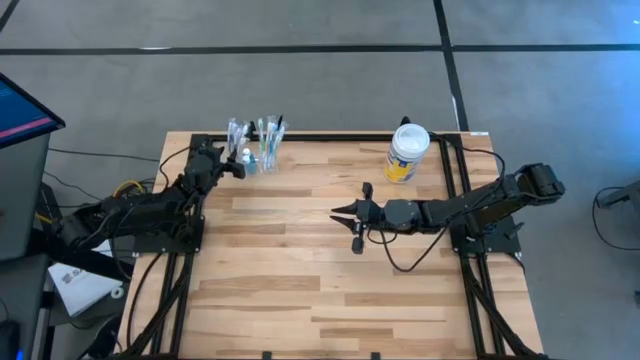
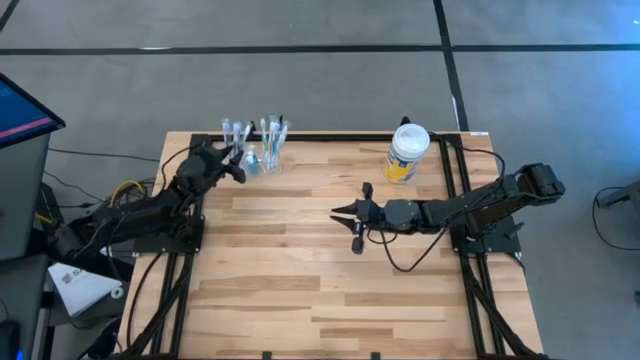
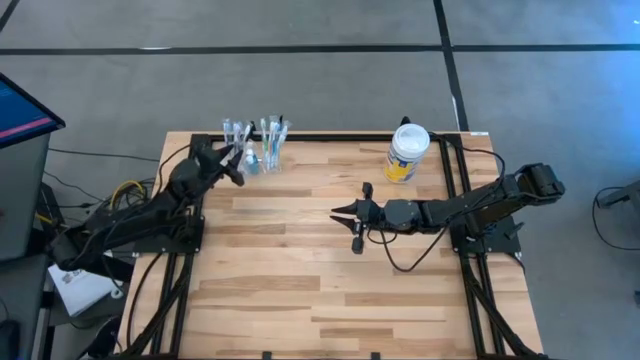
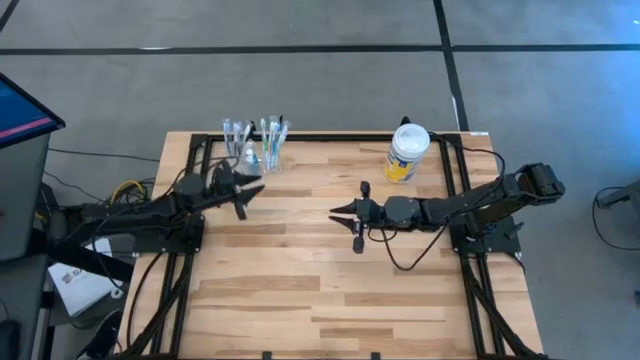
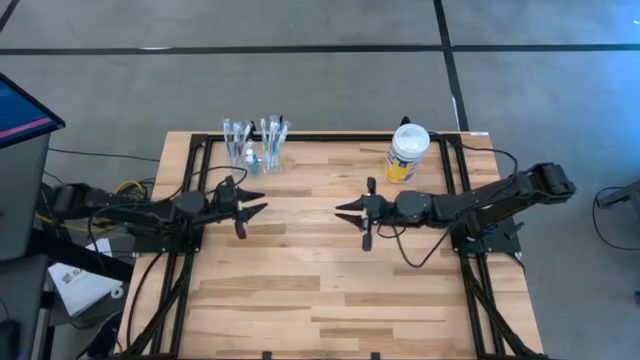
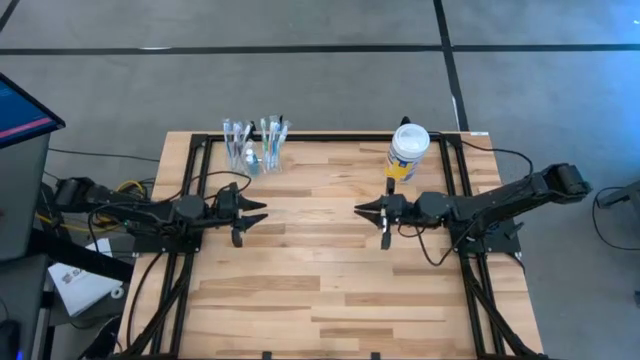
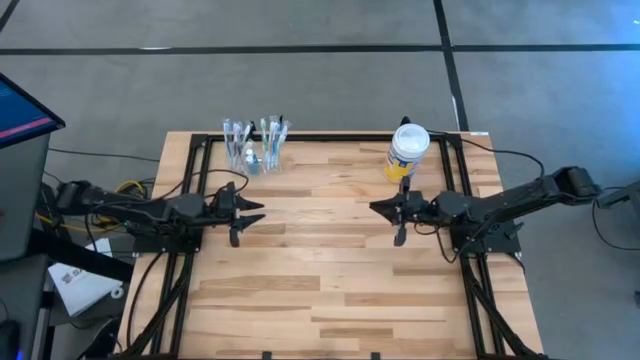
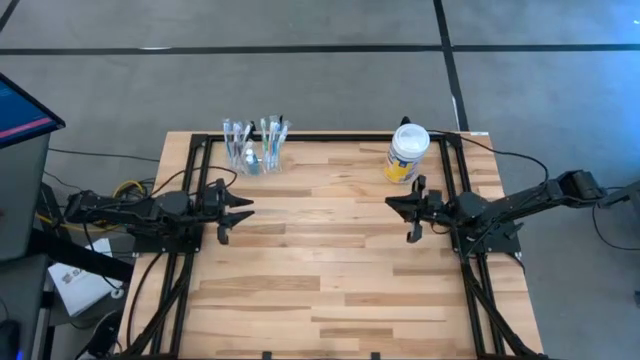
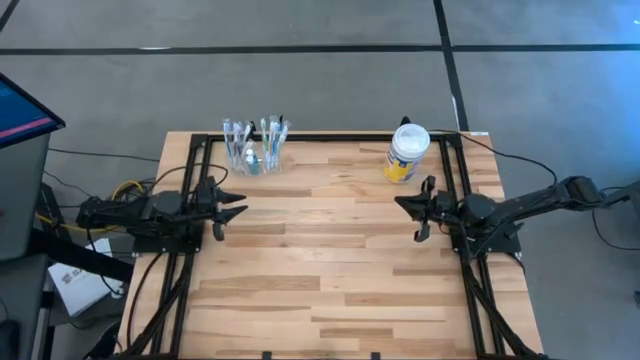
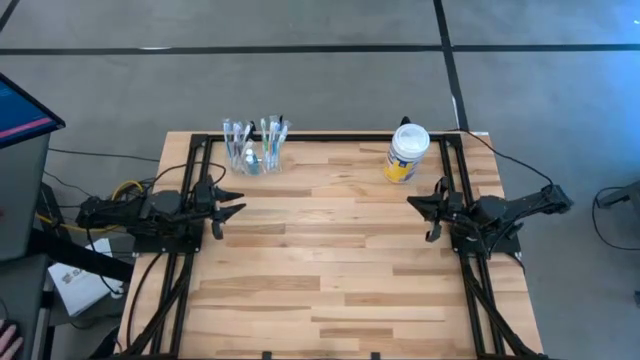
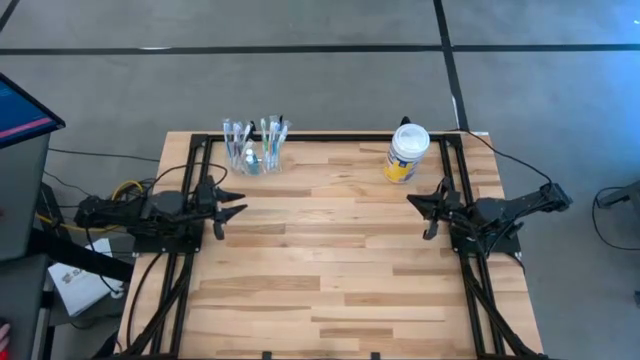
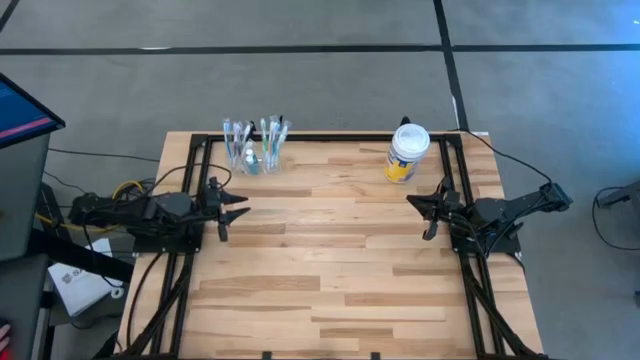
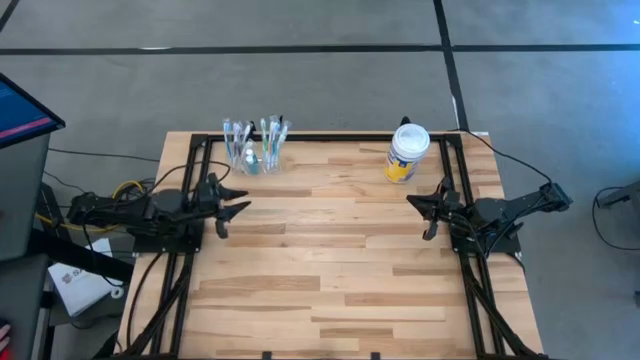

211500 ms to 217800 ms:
Task: Pick & Place toothbrushing station
Return to Home Position

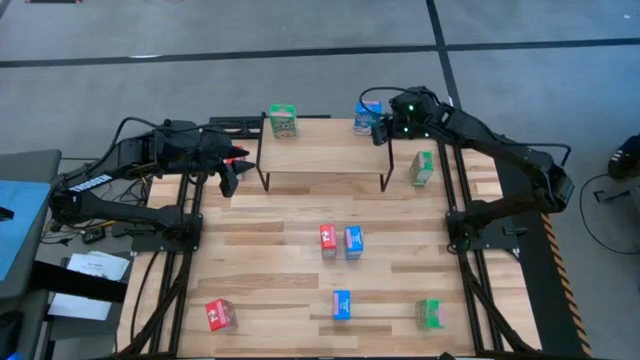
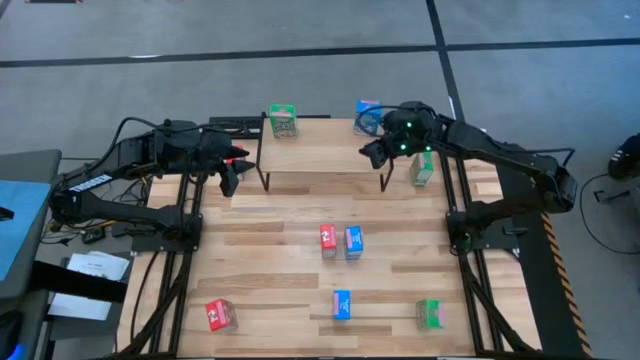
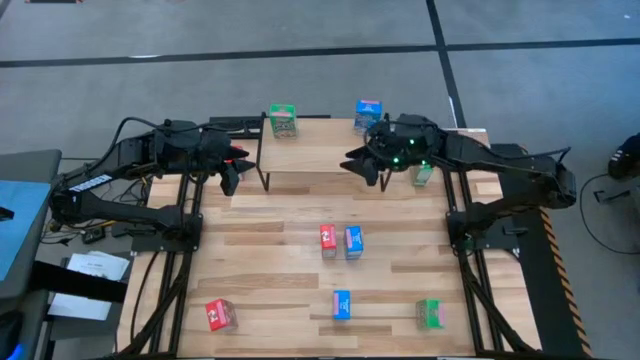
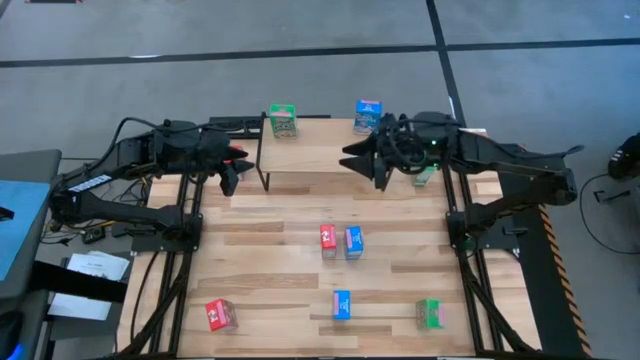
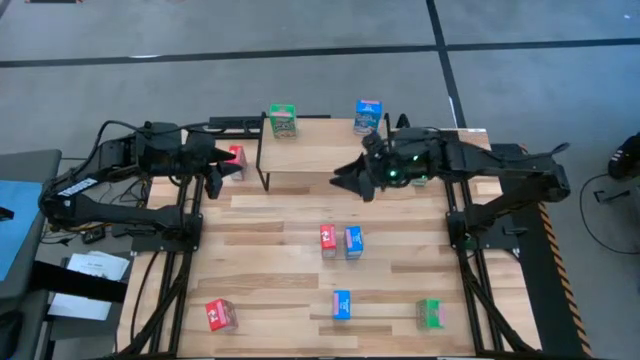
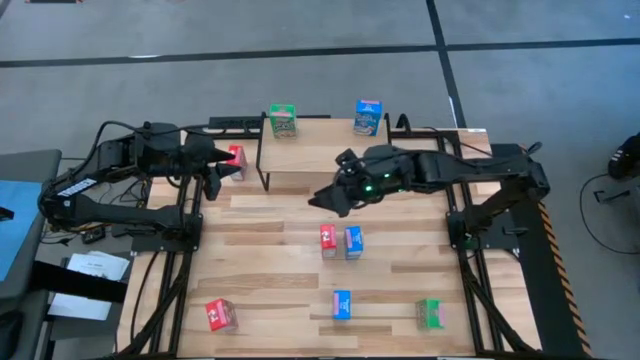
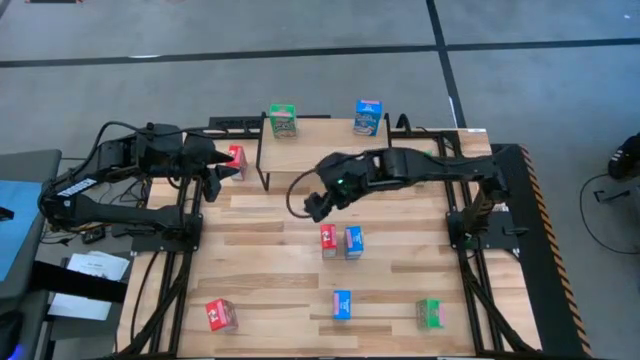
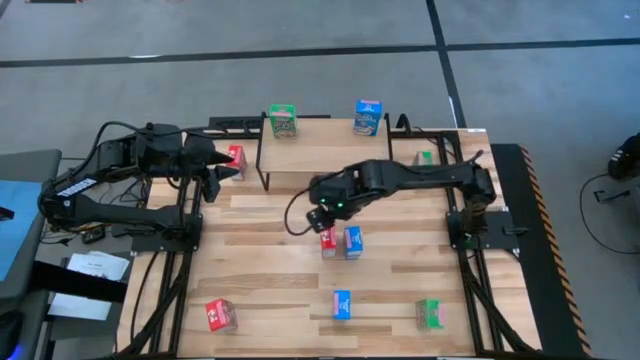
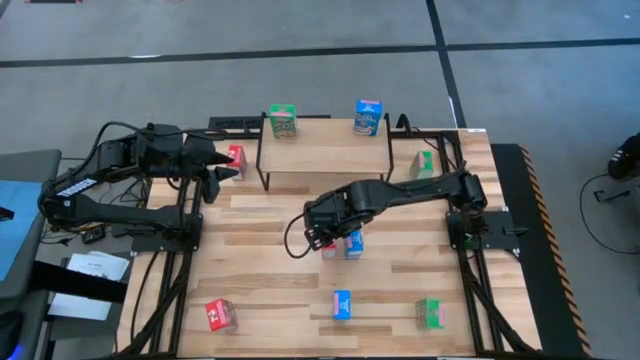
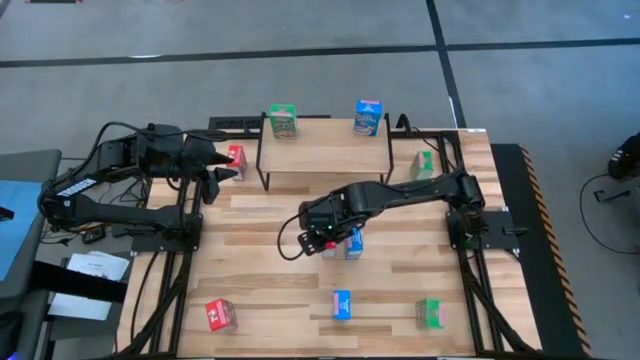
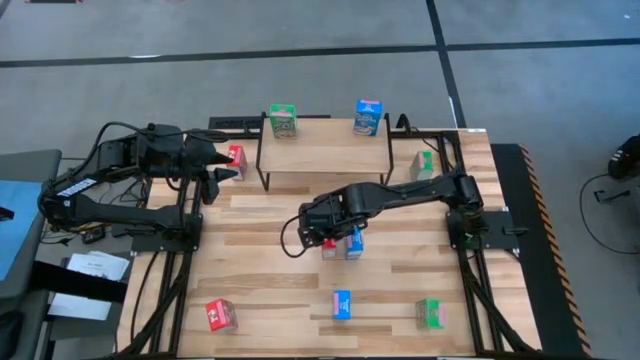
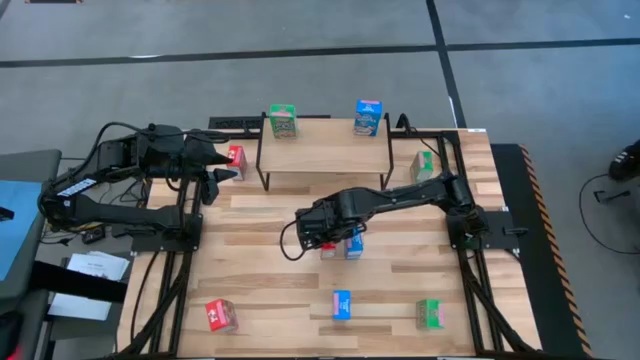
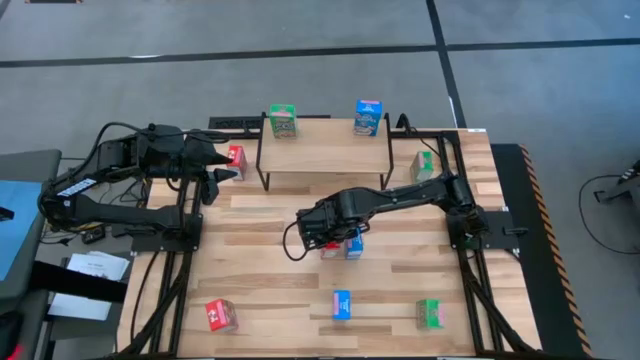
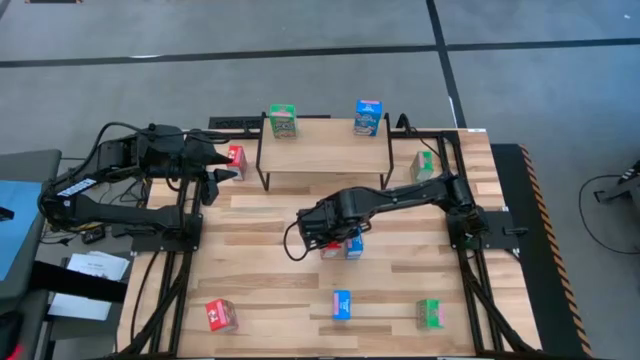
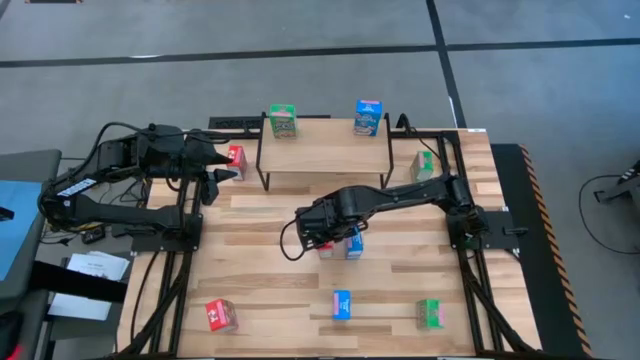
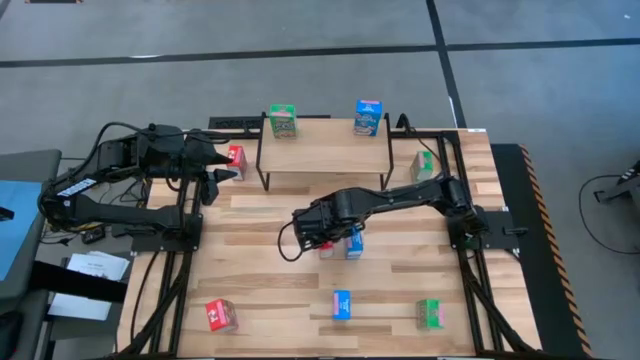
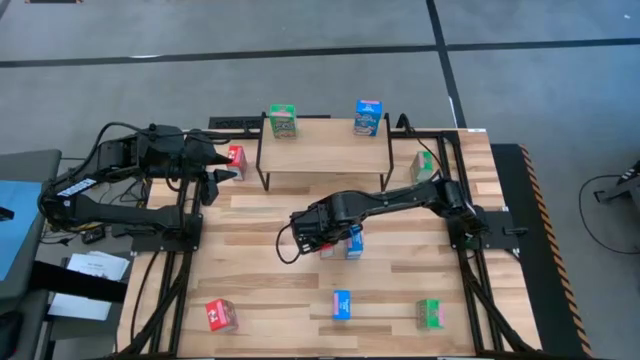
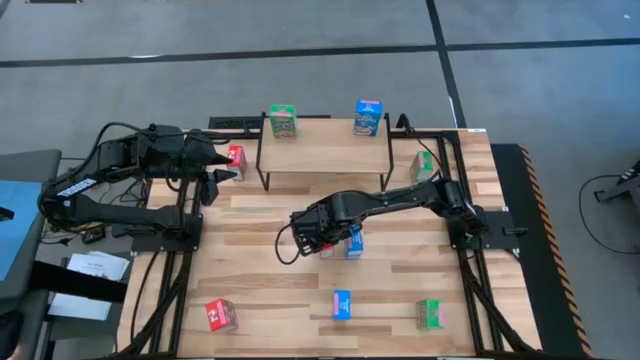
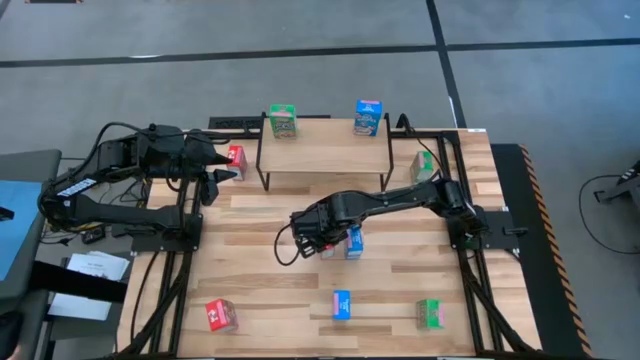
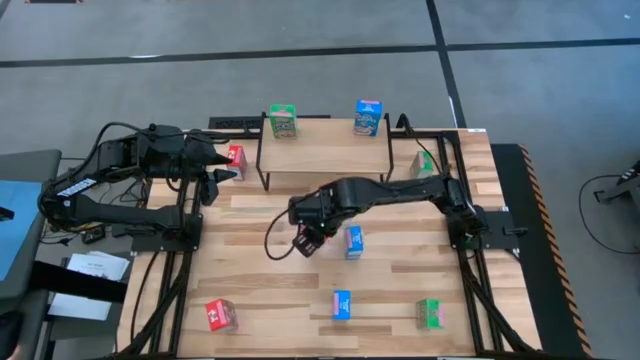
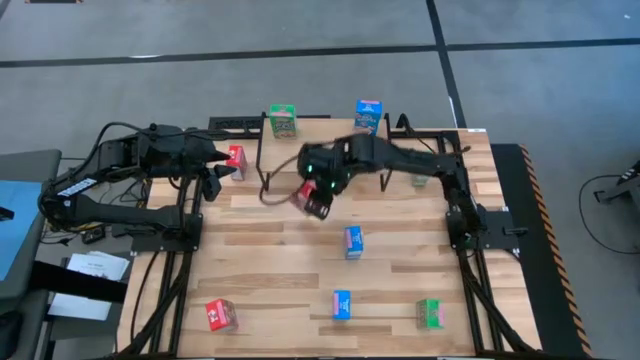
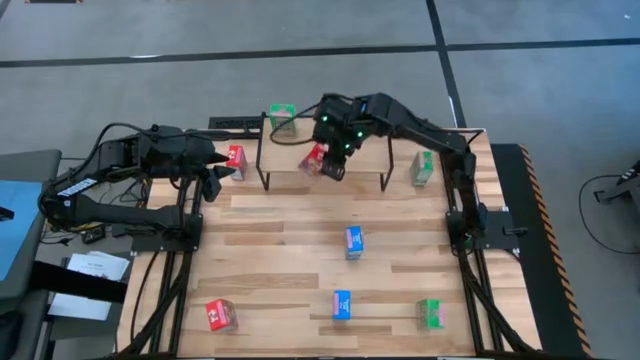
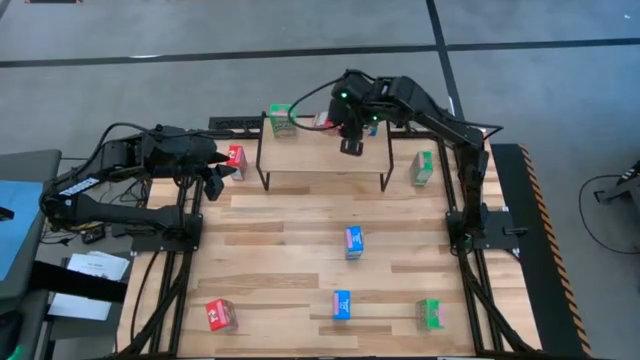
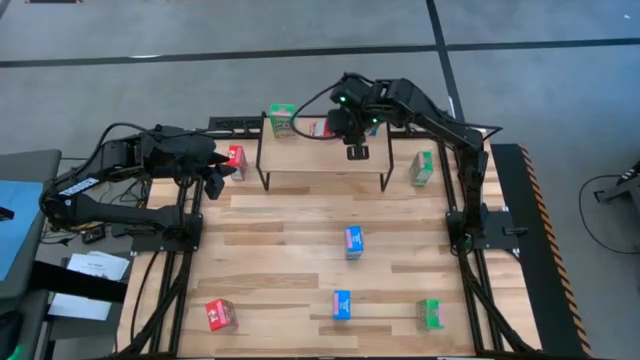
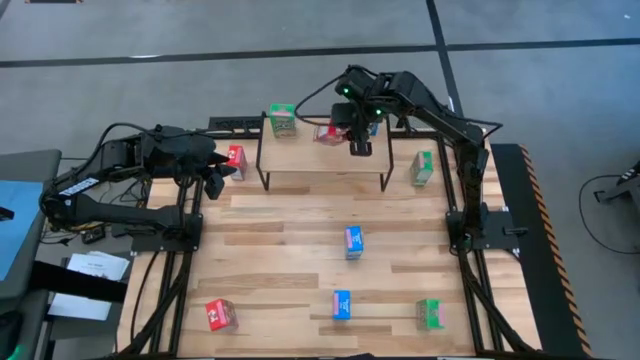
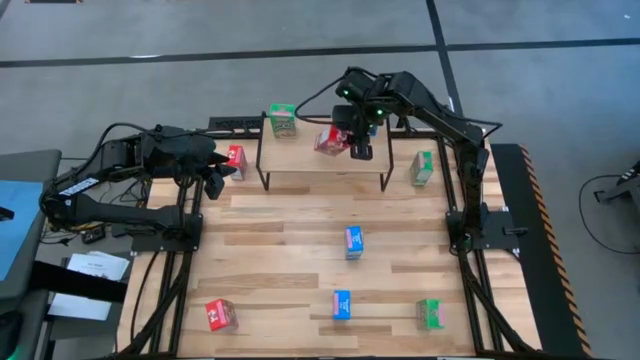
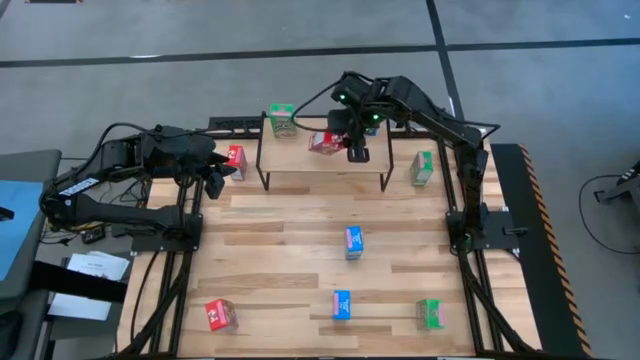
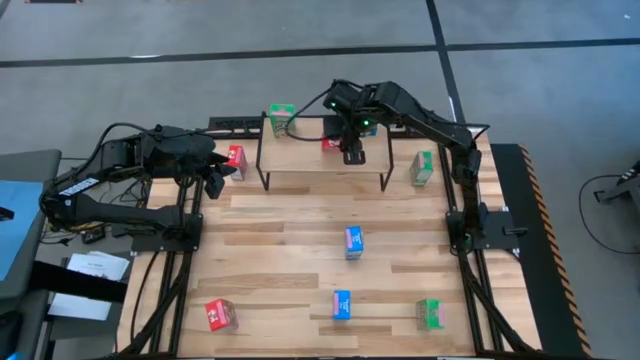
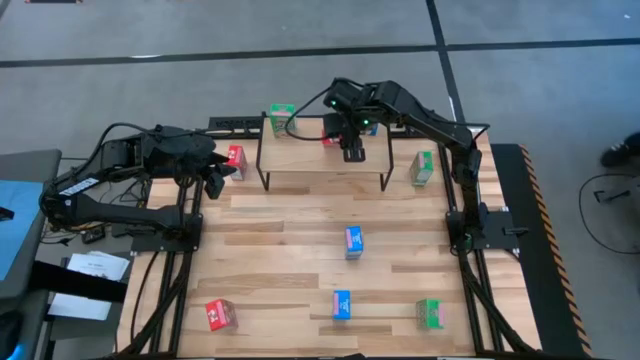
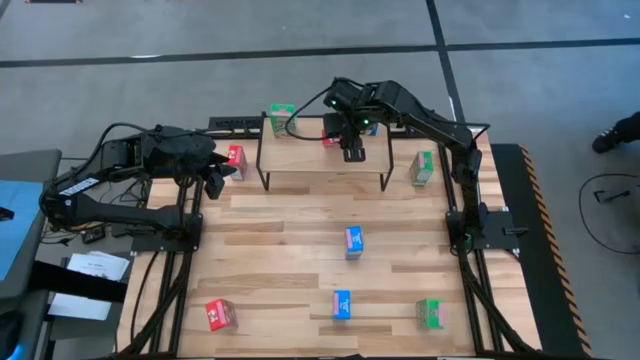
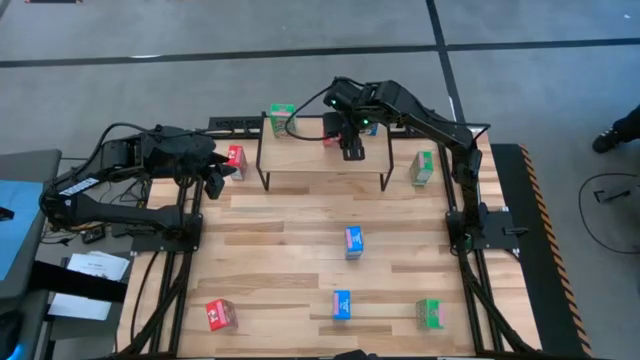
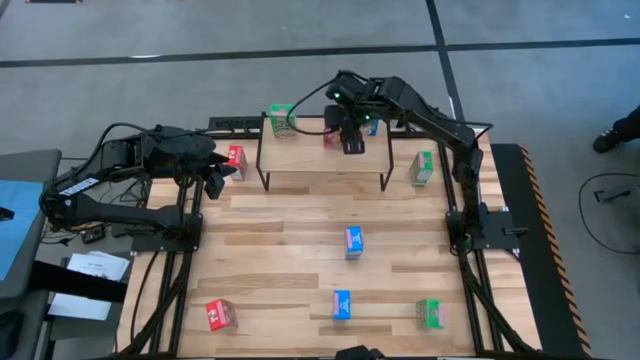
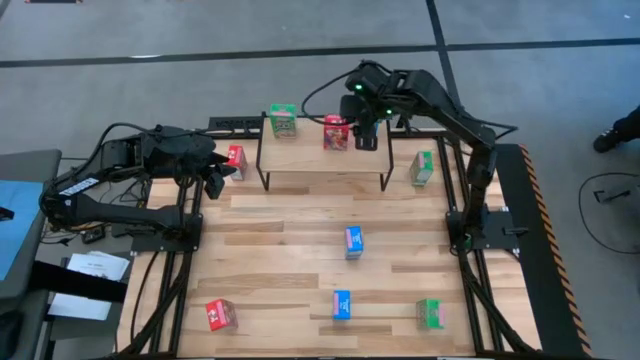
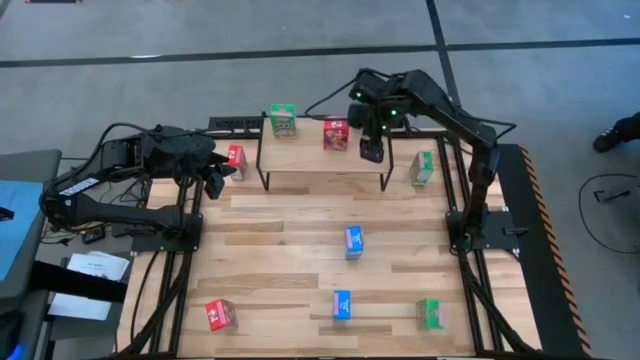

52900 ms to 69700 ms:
Task: Stack cereal on shelf
Put the middle right red cereal box on the shelf
